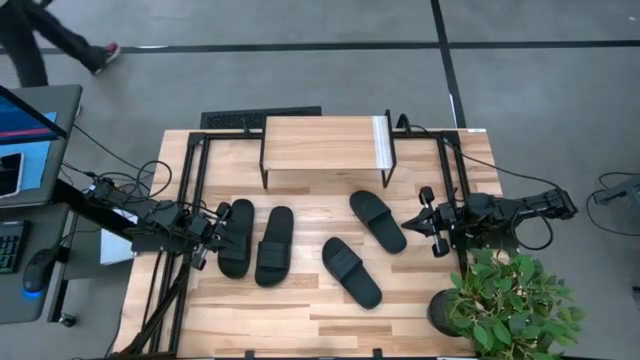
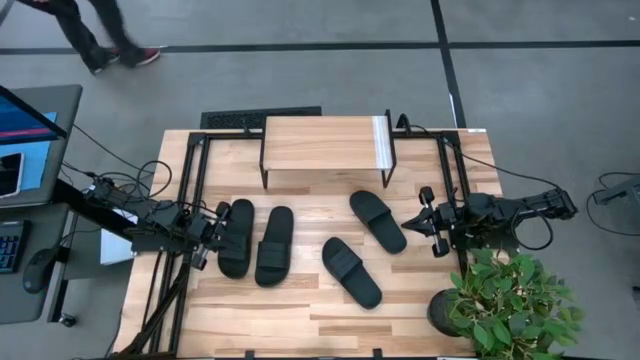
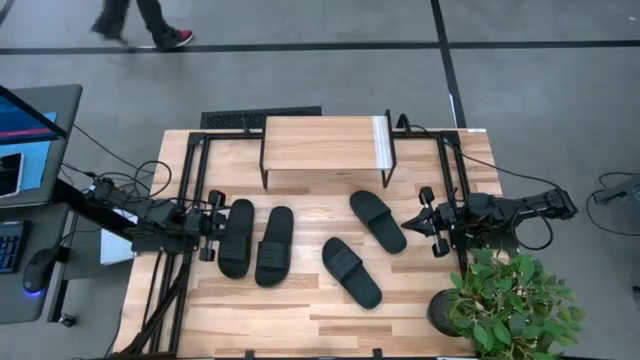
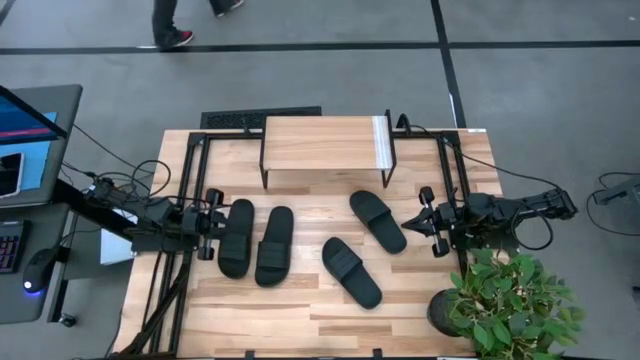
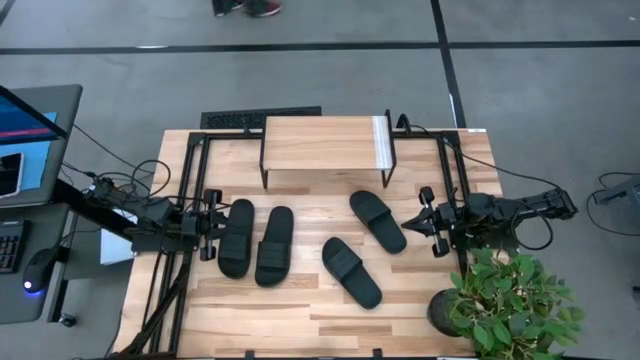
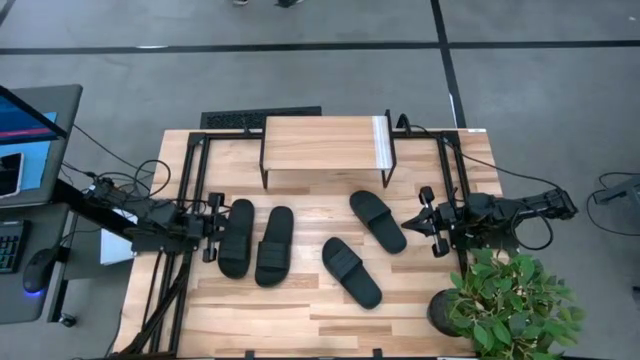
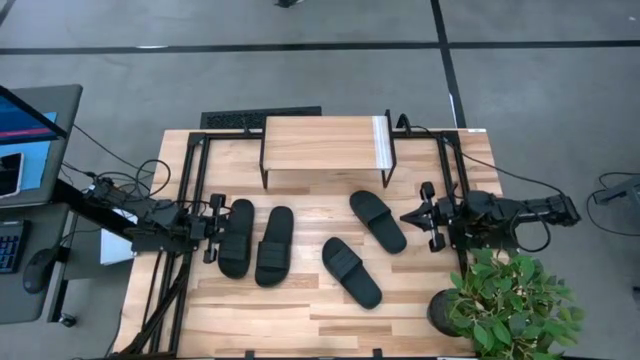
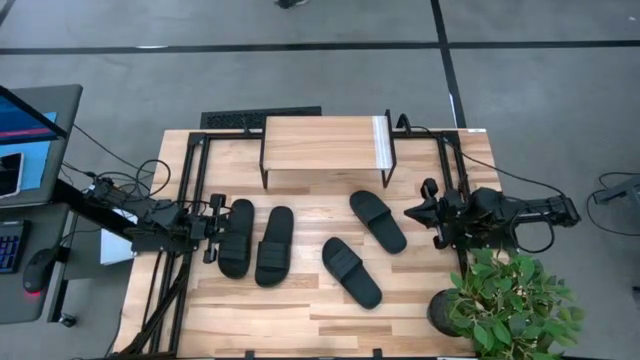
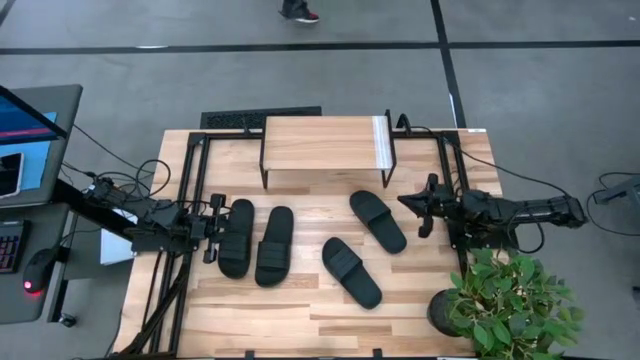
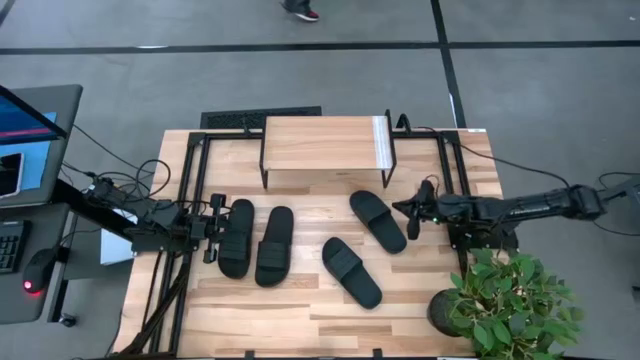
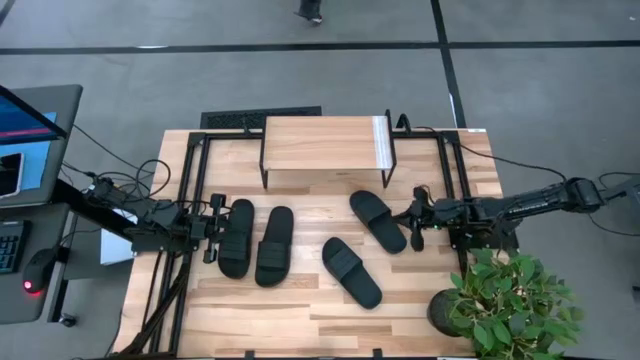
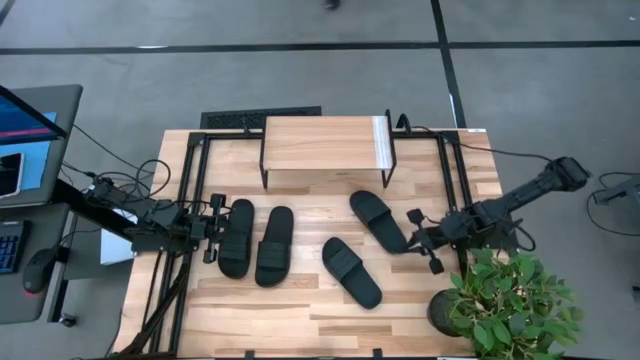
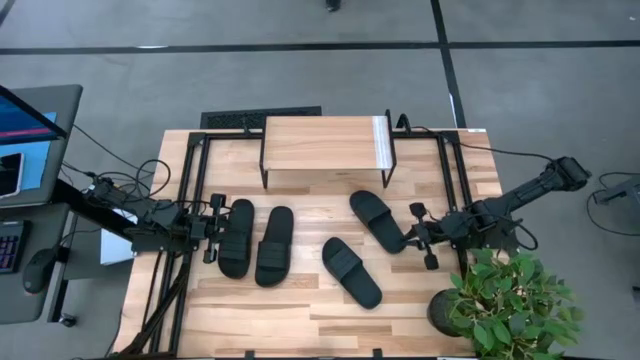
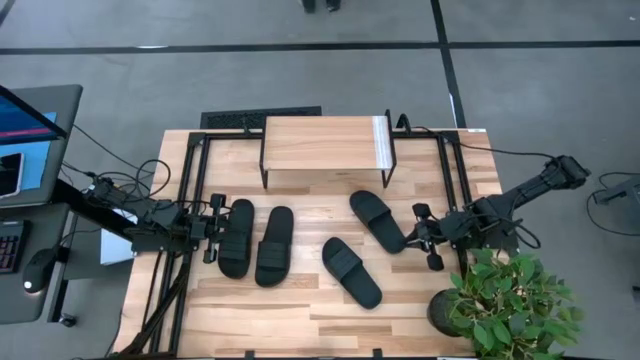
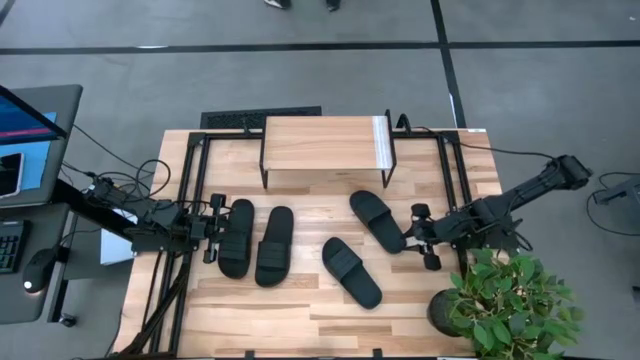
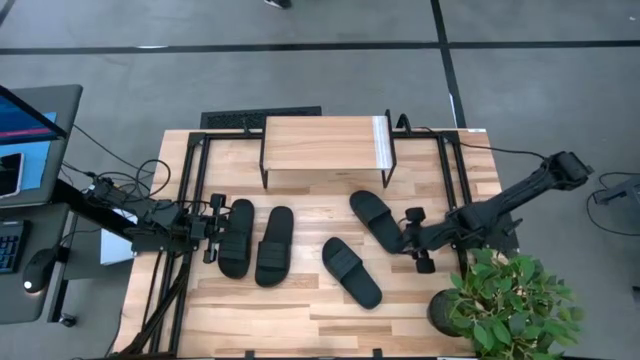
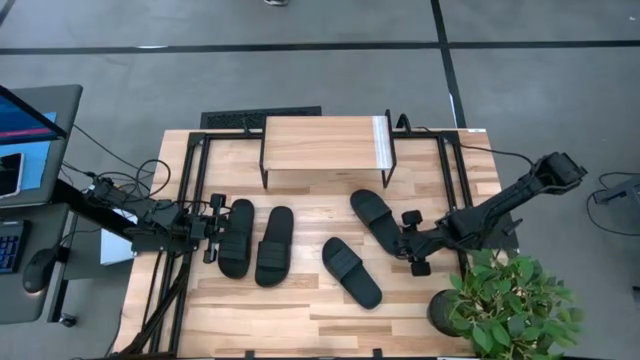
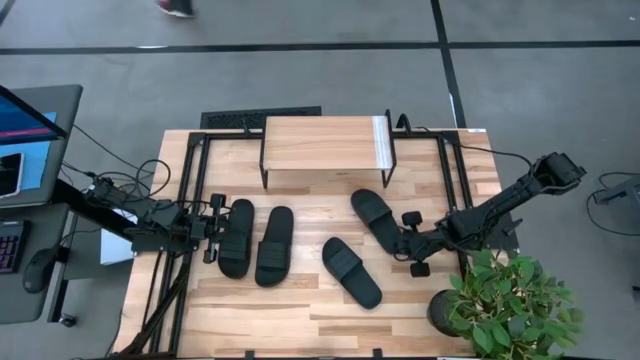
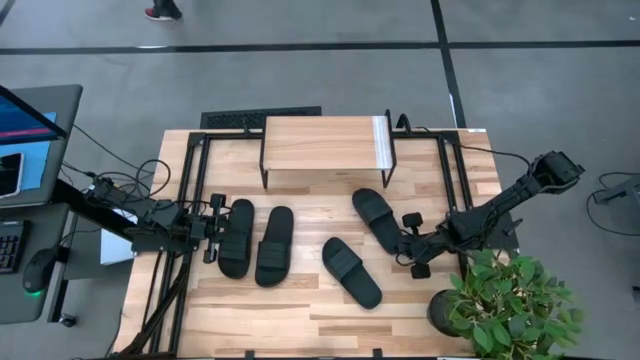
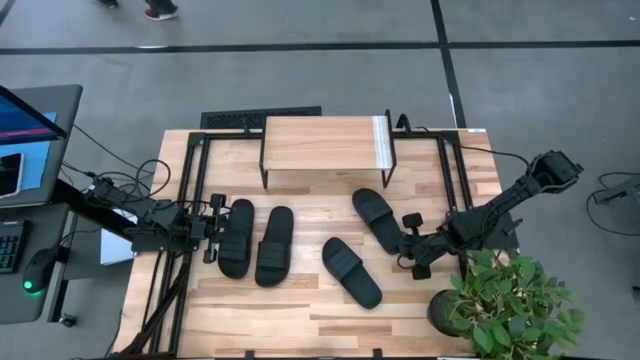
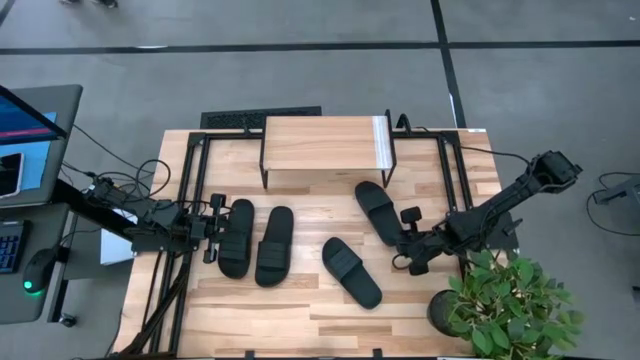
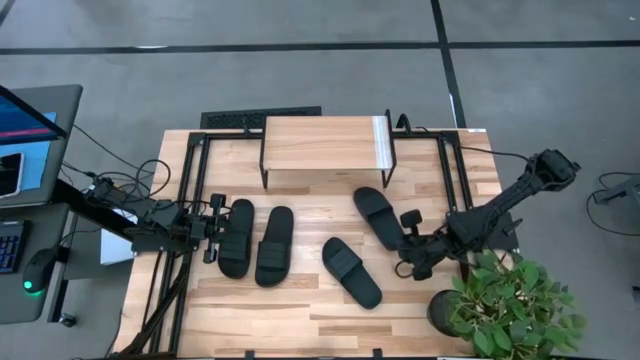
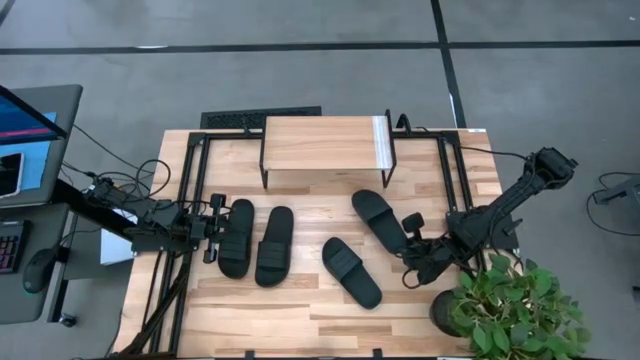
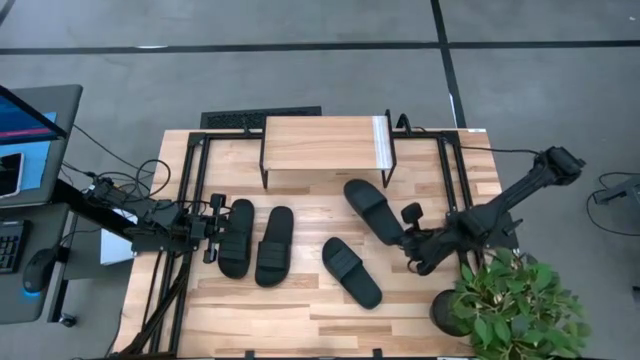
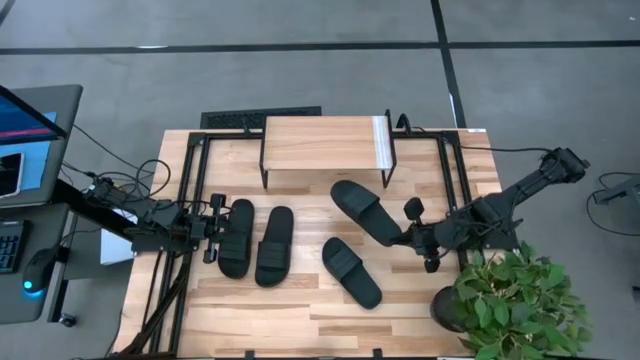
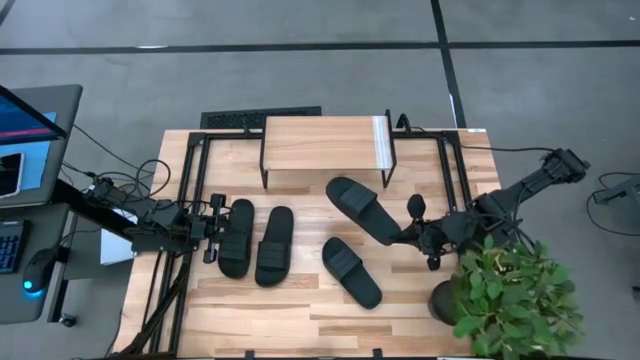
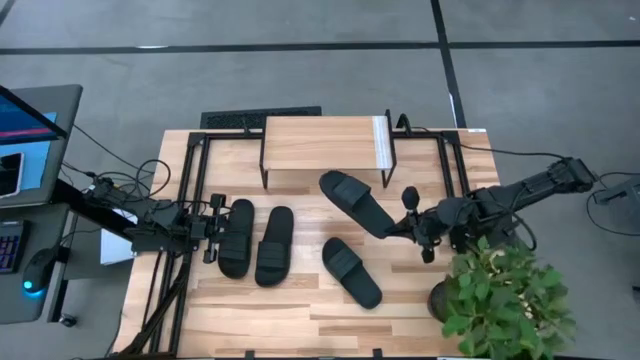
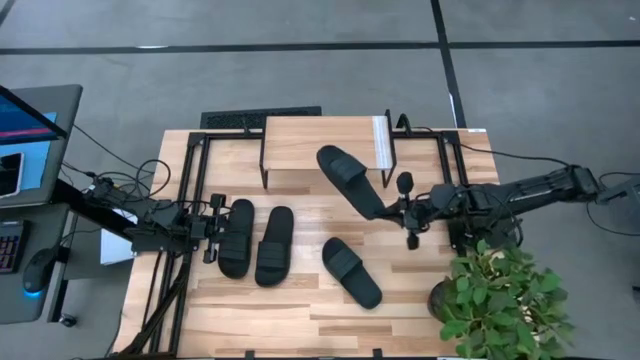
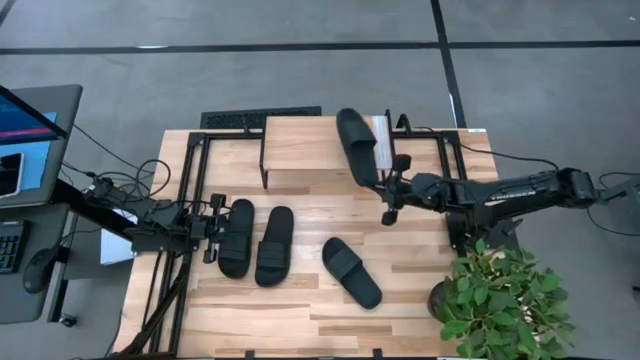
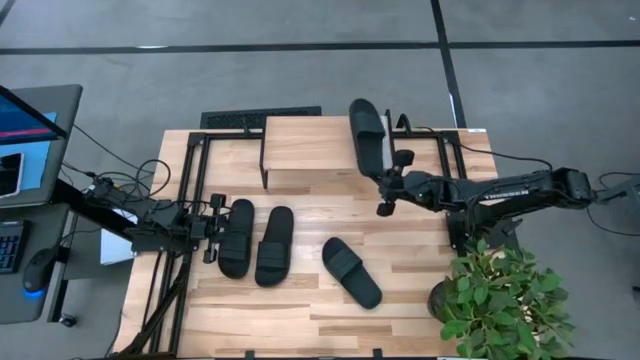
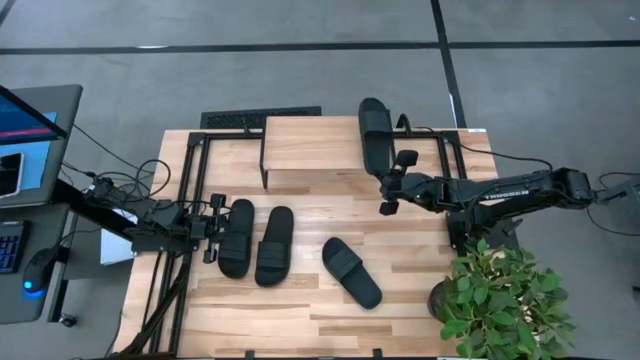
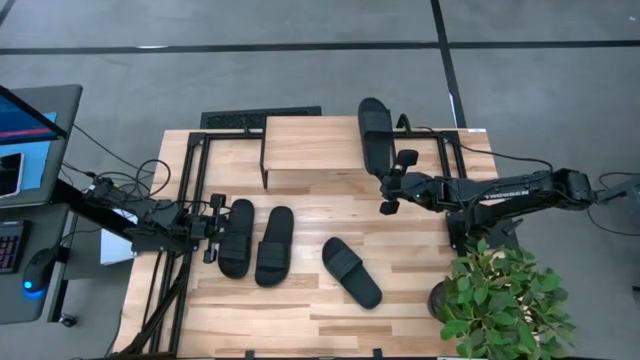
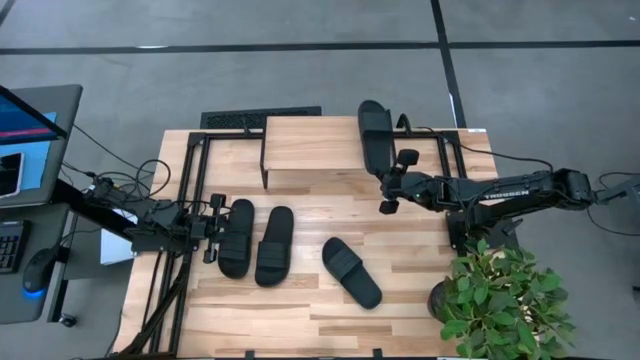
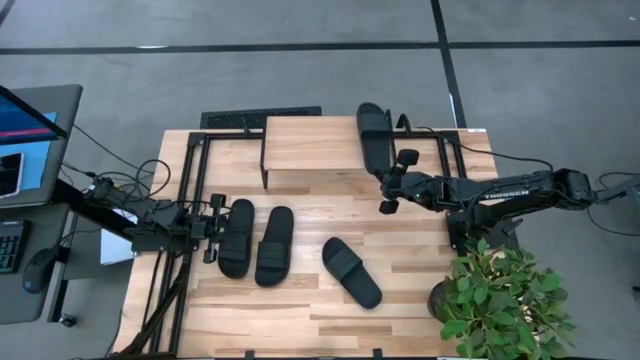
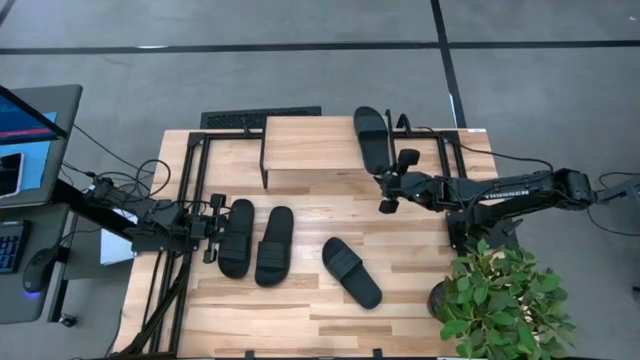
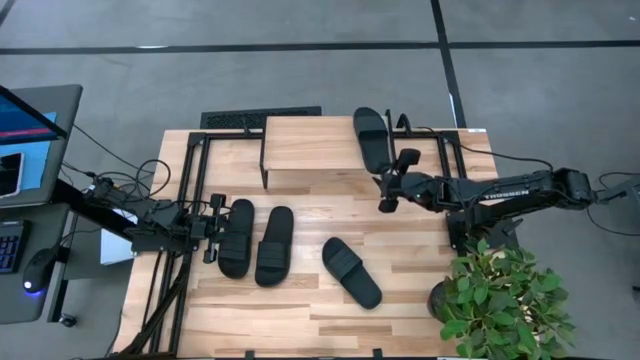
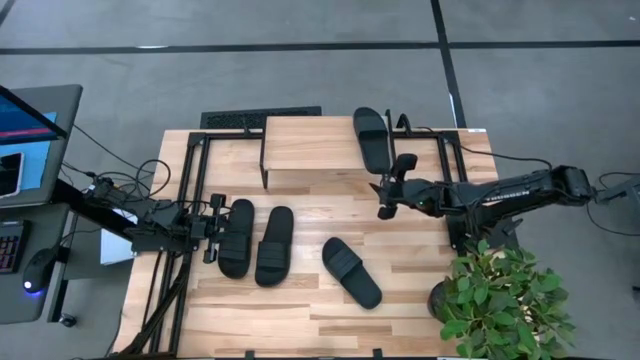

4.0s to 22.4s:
Task: Pick and place slides into the shelf
Put the right black slide on the shelf

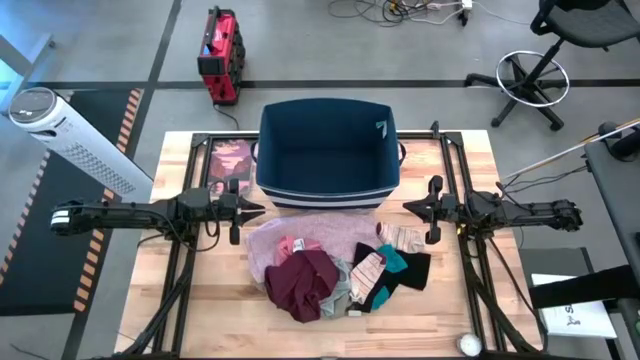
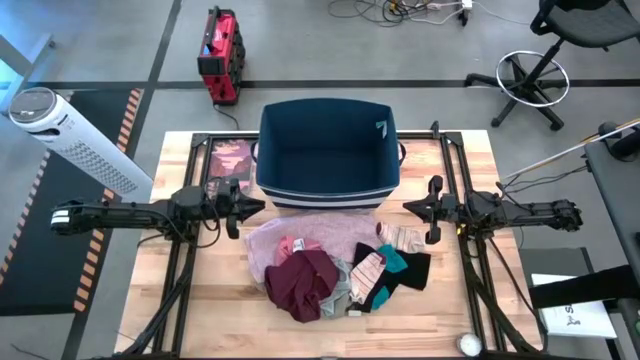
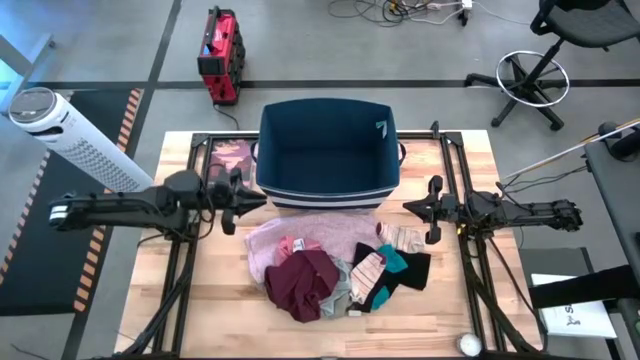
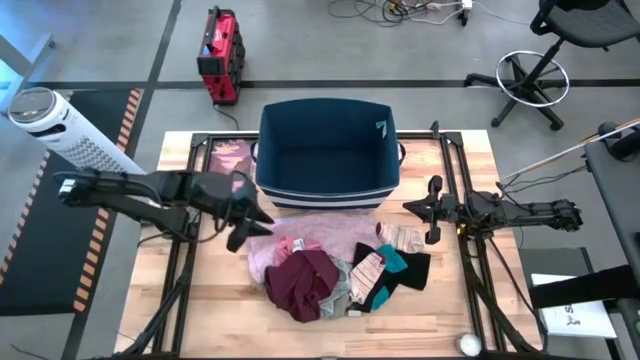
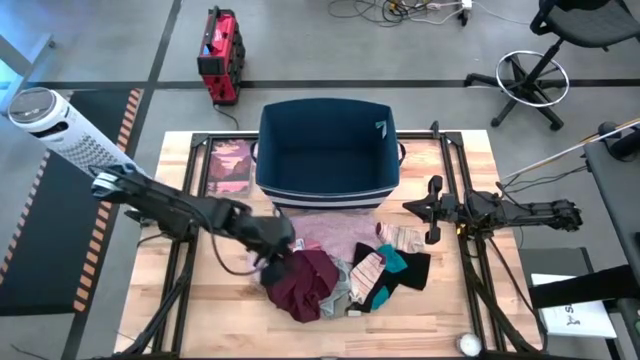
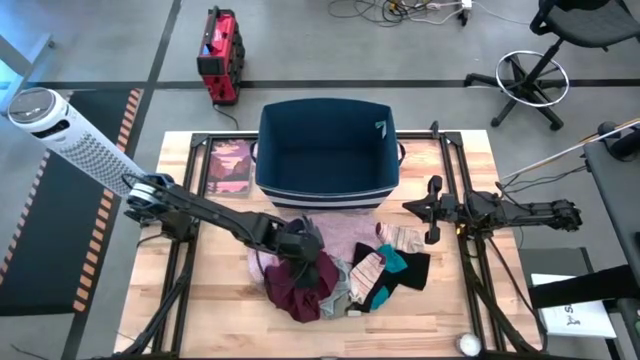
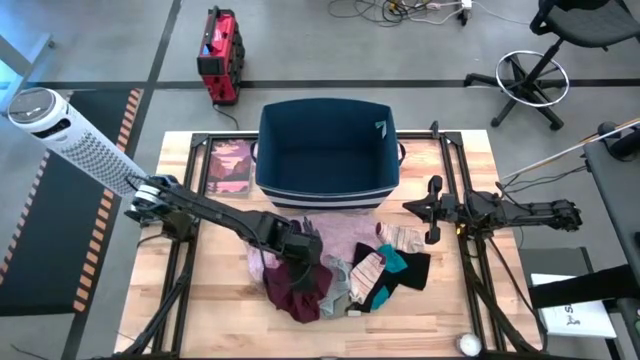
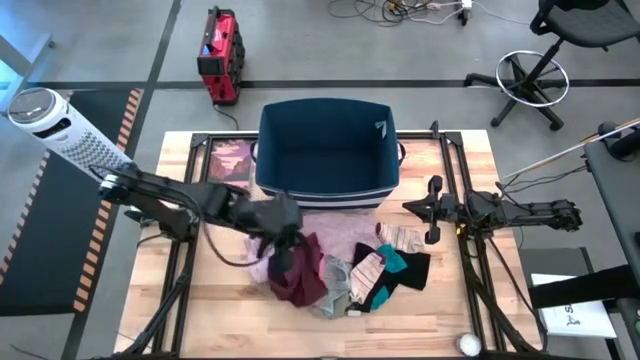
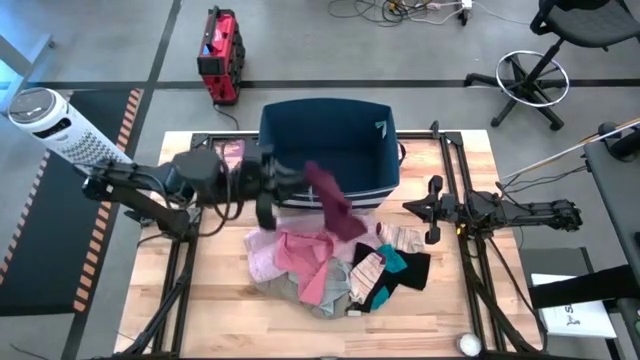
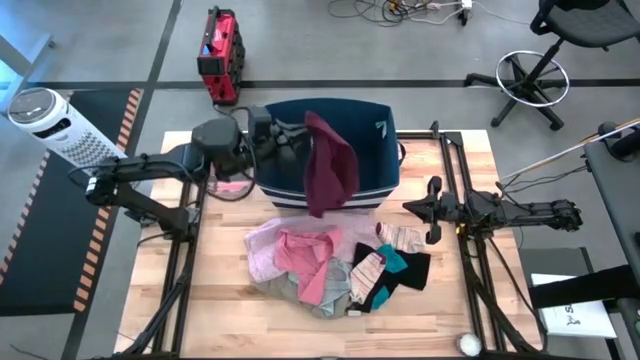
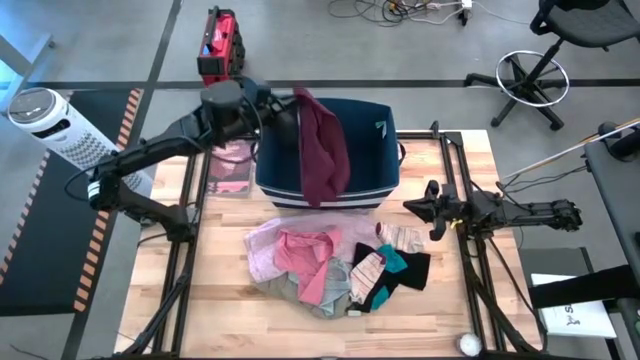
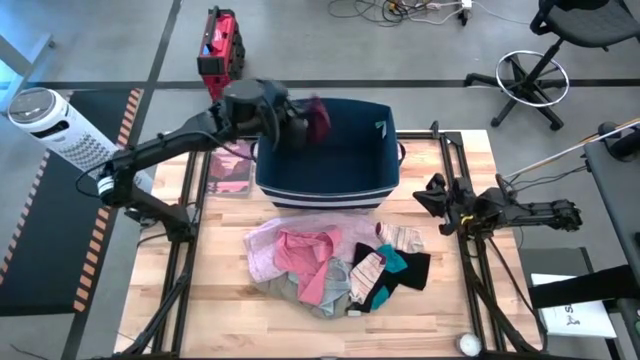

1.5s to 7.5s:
Task: Sort clothes
Put the red underwear into the blue laundry bin
